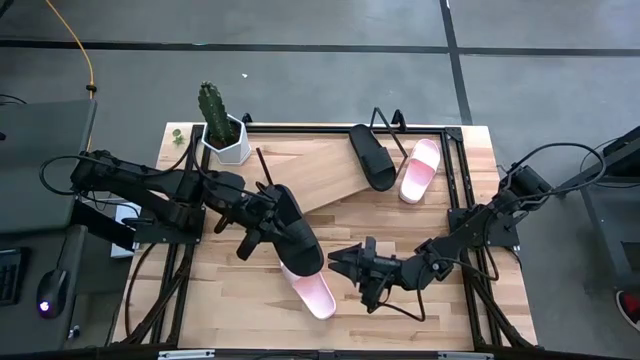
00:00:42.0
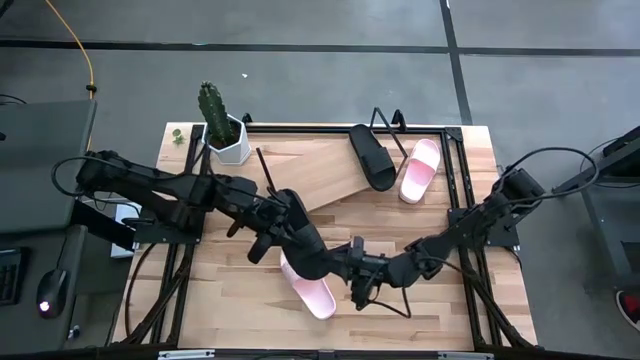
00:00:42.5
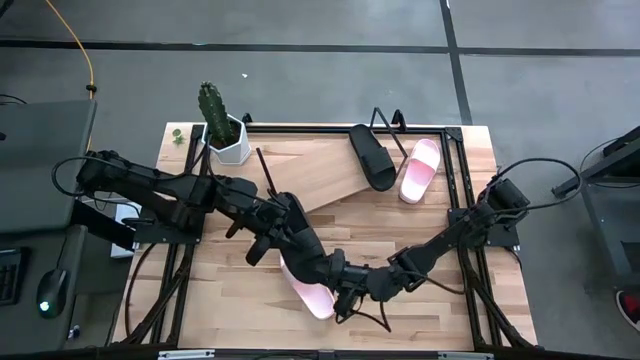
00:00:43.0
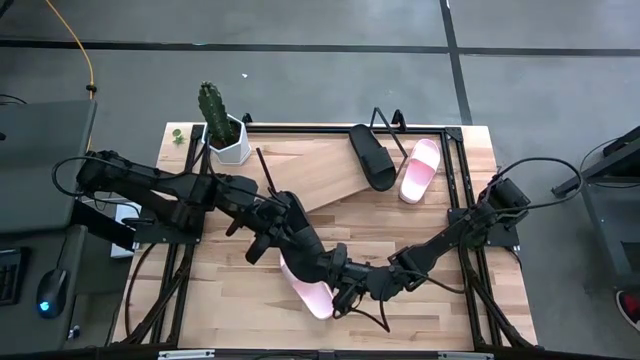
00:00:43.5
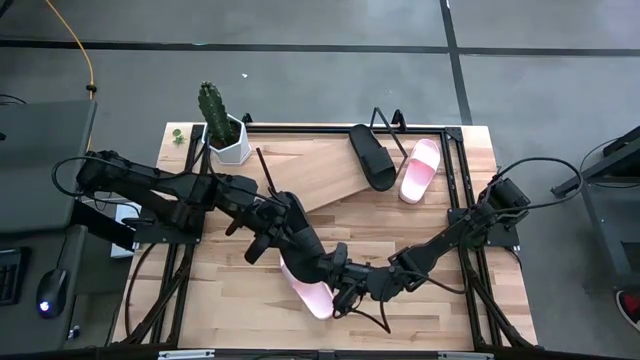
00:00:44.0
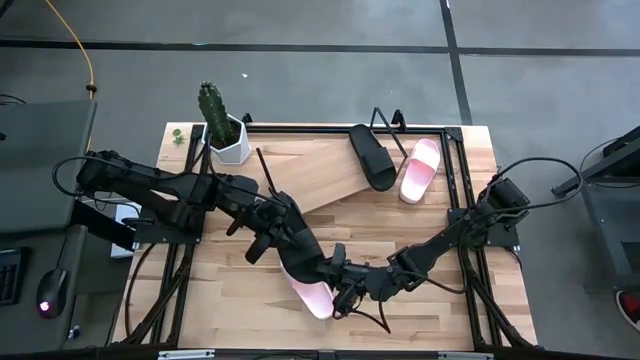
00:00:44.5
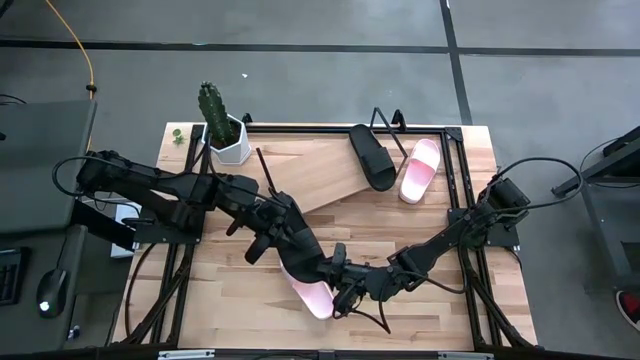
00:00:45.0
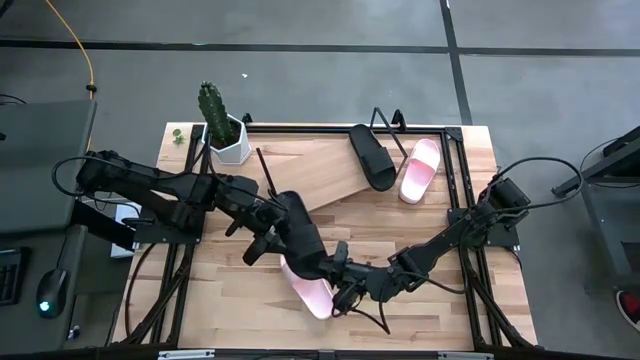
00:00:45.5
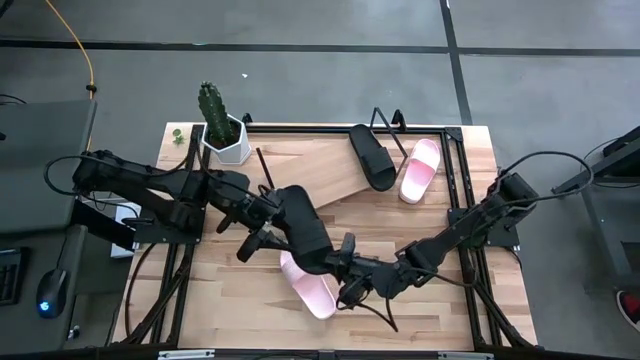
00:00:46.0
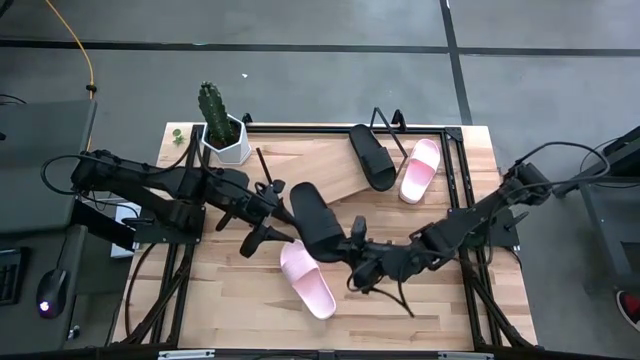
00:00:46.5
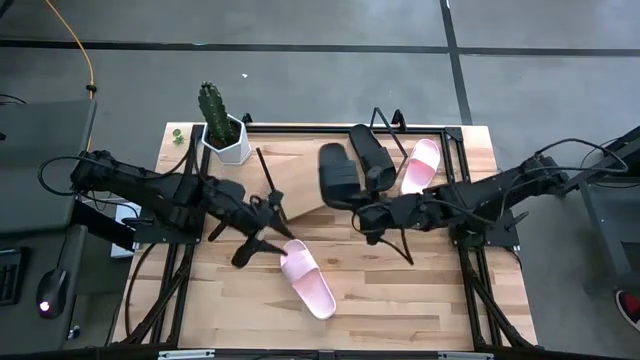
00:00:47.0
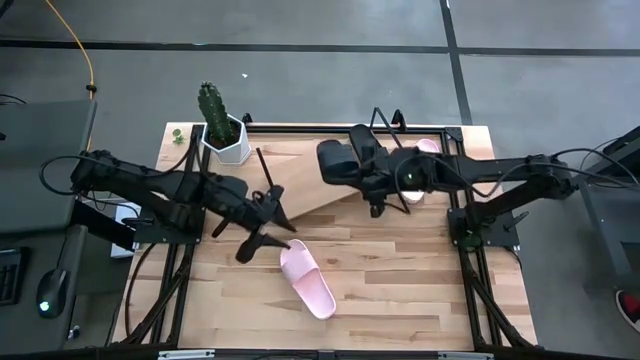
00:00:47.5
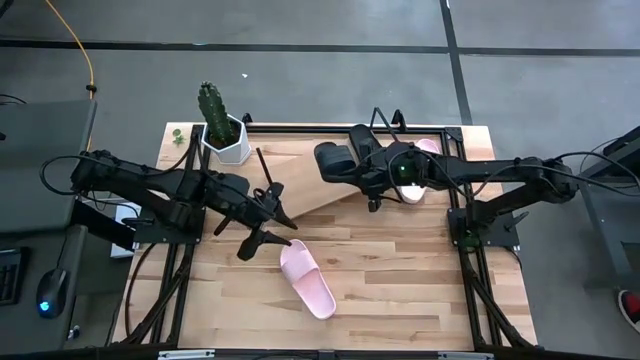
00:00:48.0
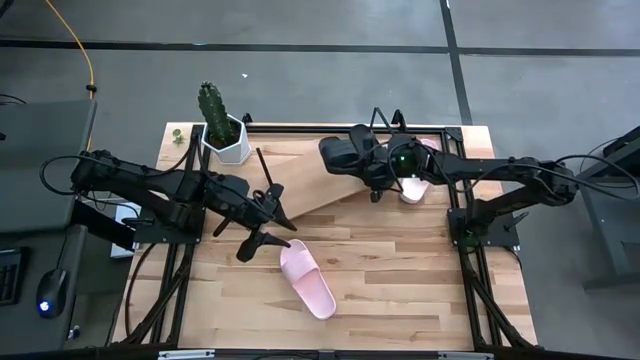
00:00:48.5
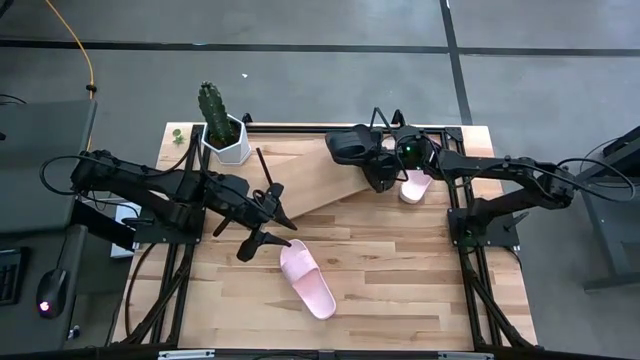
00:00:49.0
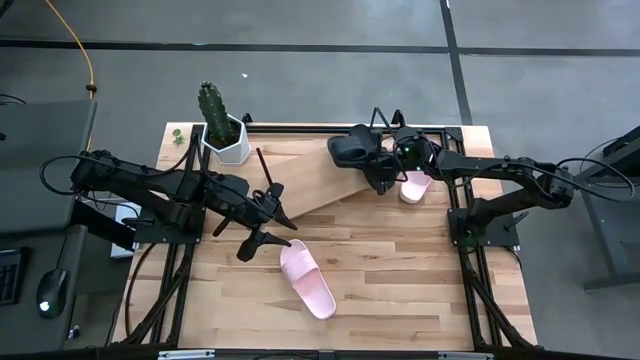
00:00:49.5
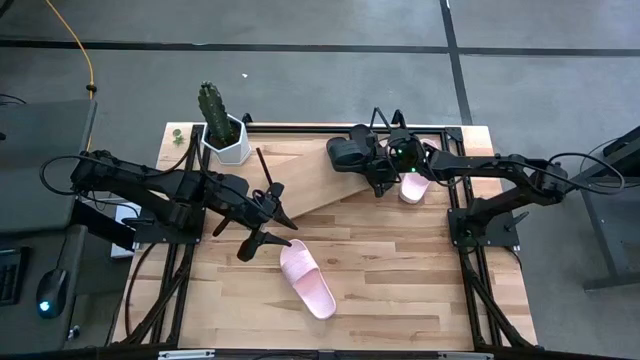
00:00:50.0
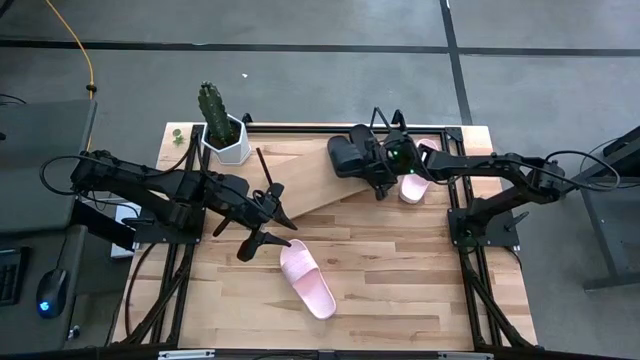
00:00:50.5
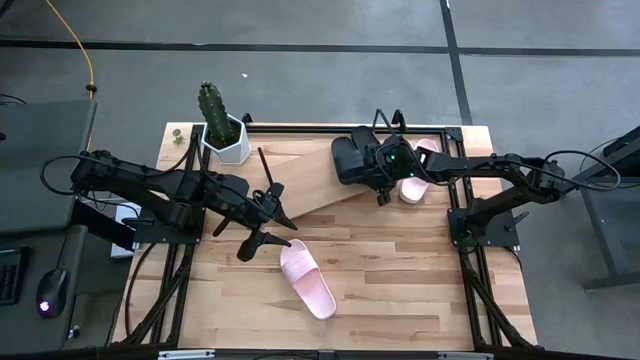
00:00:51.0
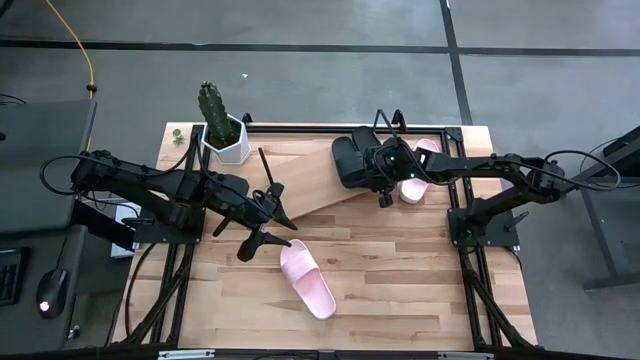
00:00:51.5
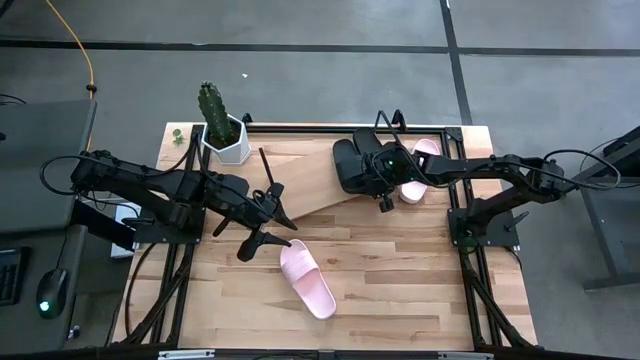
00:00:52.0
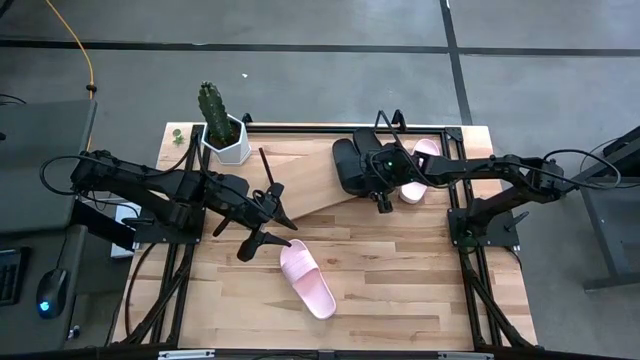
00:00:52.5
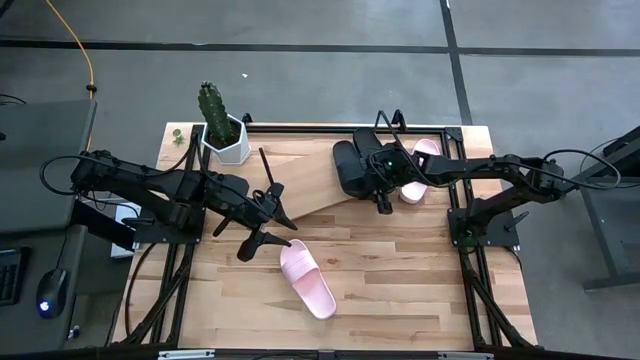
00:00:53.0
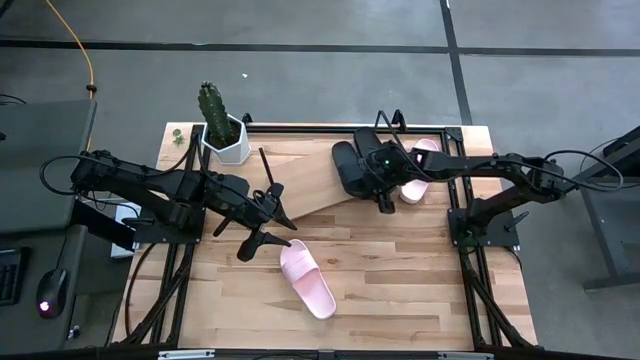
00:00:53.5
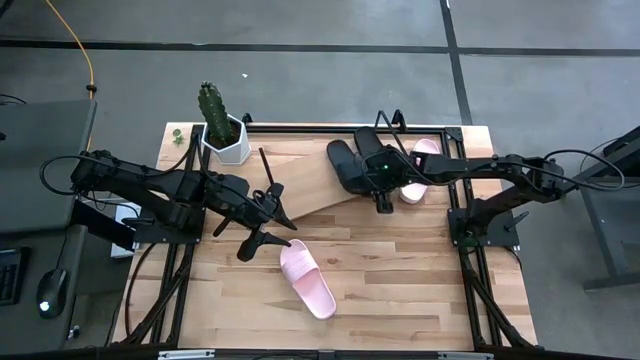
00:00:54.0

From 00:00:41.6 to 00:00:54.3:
Task: Pick and place slides into the shelf
Put the left black slide on the shelf

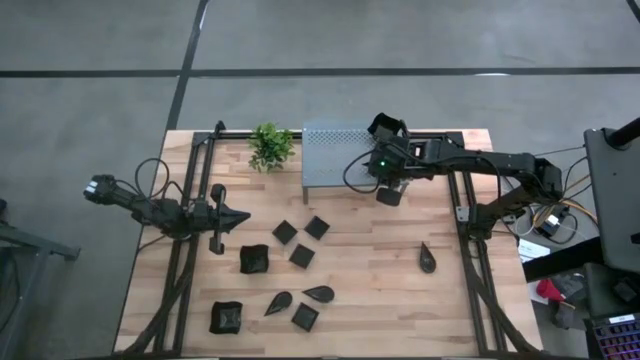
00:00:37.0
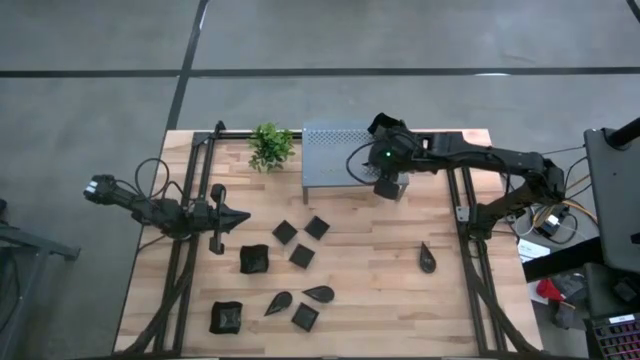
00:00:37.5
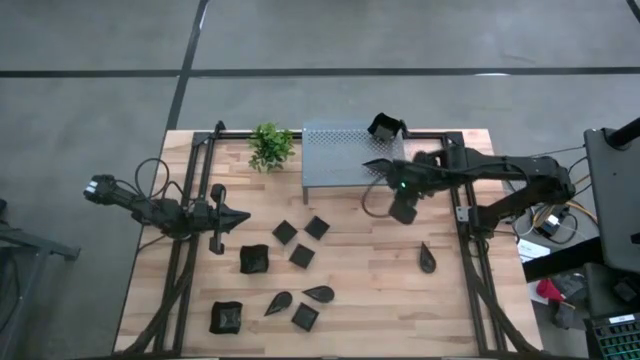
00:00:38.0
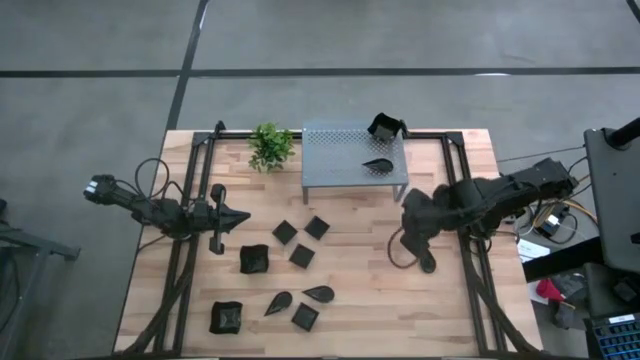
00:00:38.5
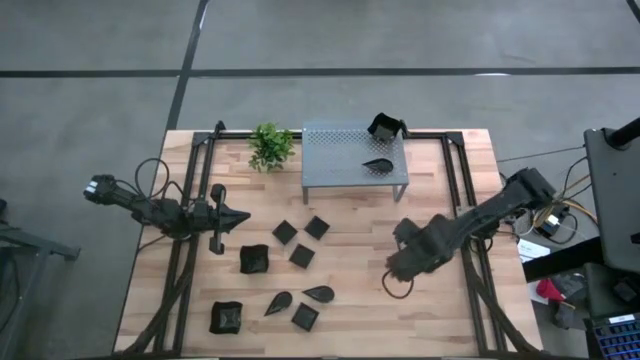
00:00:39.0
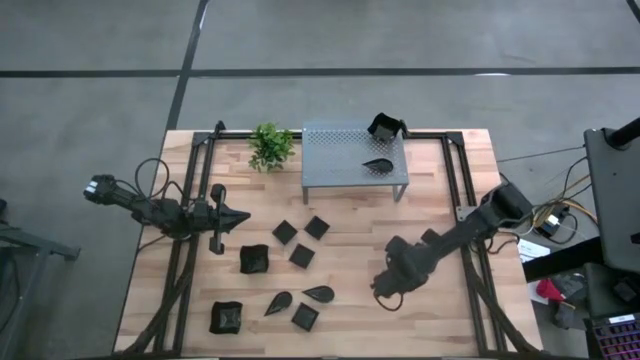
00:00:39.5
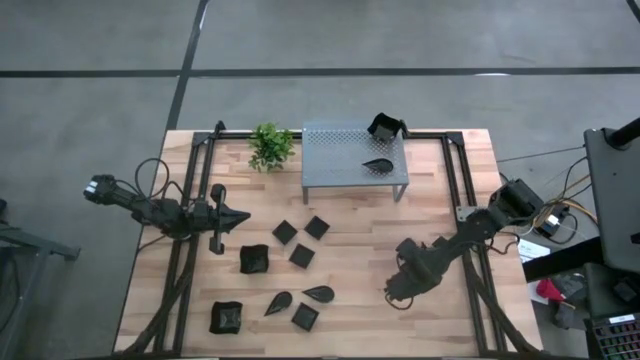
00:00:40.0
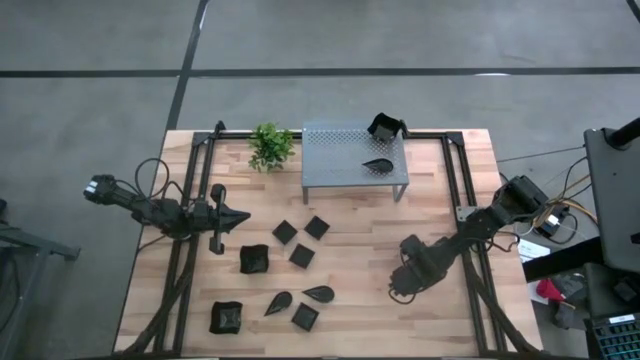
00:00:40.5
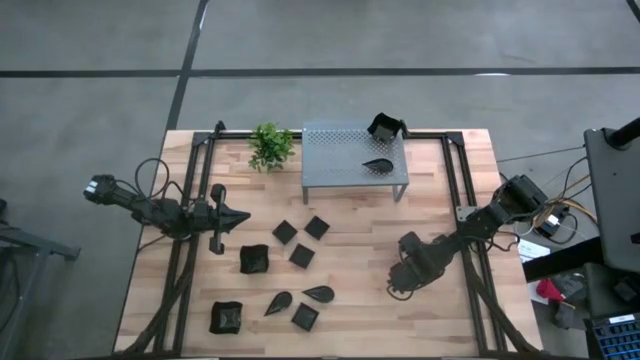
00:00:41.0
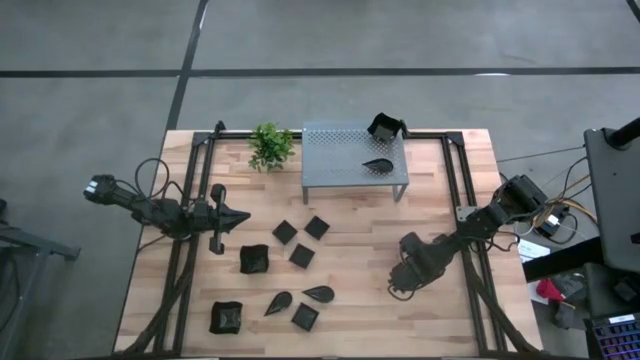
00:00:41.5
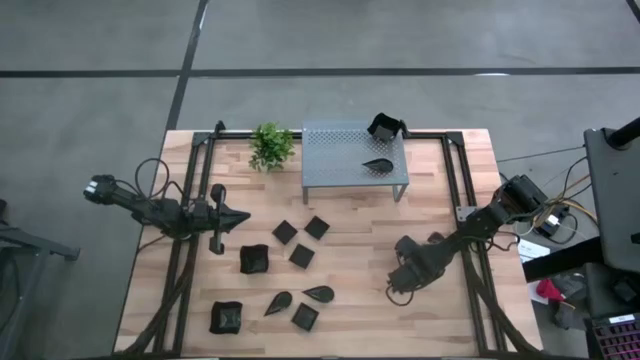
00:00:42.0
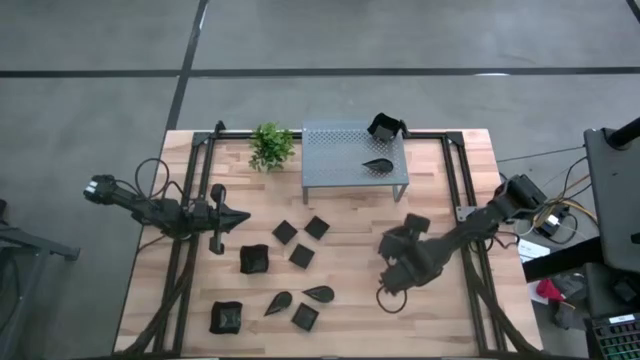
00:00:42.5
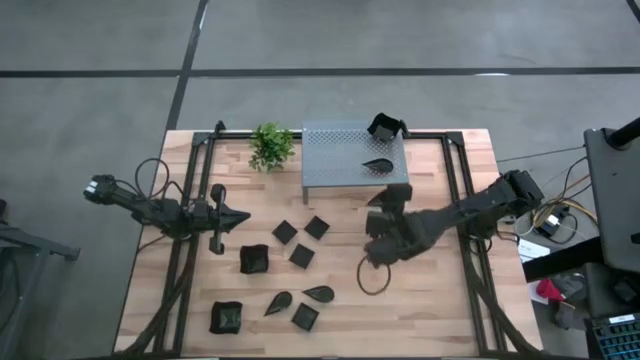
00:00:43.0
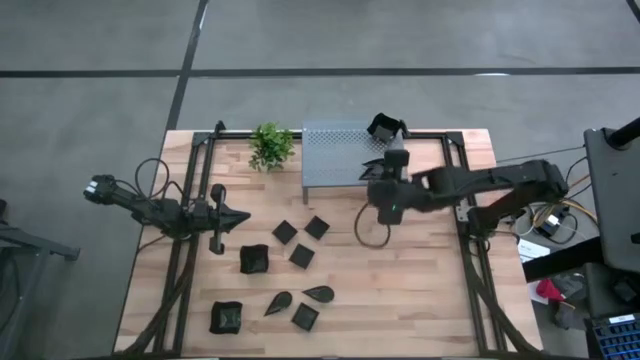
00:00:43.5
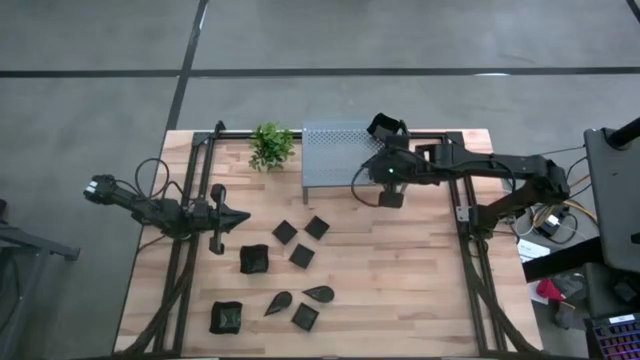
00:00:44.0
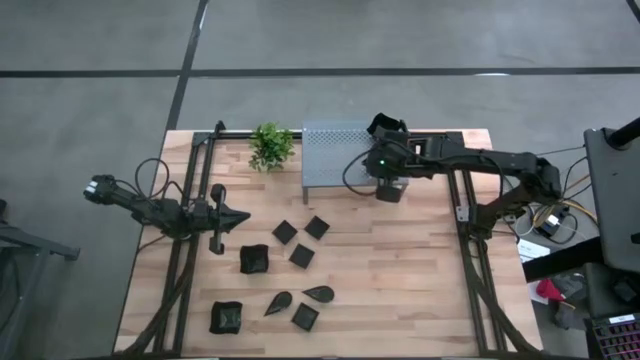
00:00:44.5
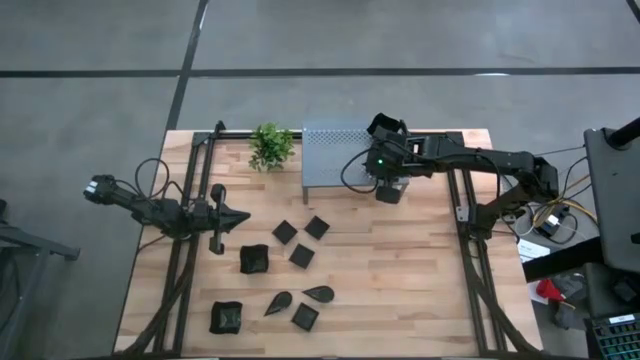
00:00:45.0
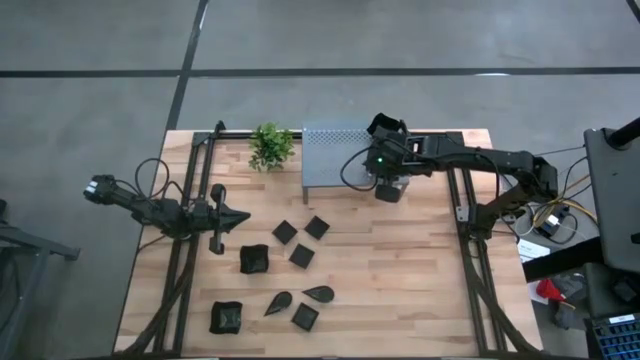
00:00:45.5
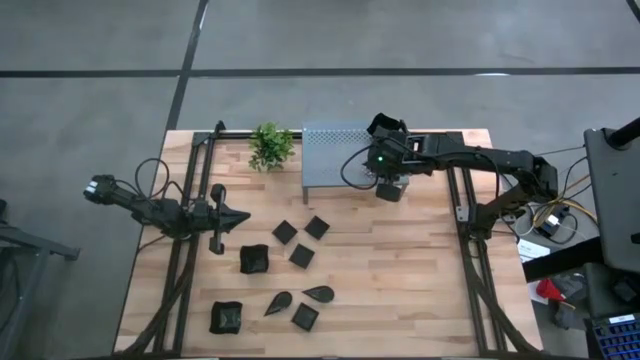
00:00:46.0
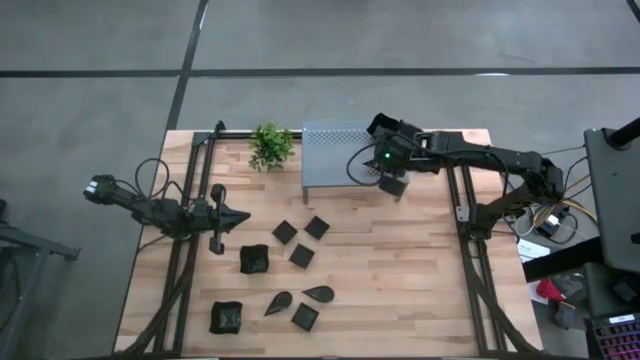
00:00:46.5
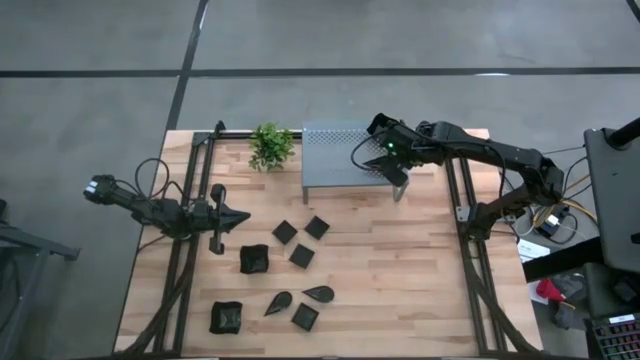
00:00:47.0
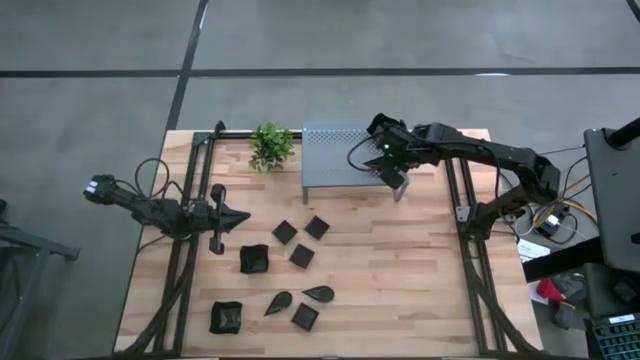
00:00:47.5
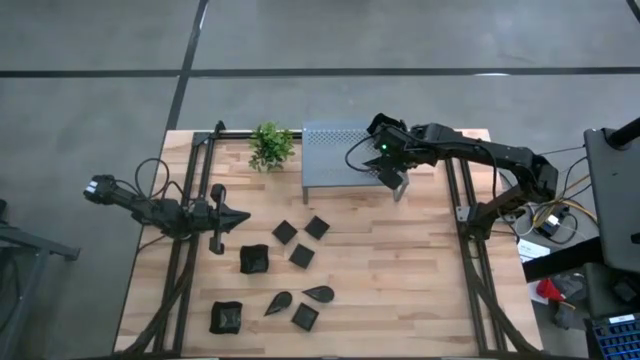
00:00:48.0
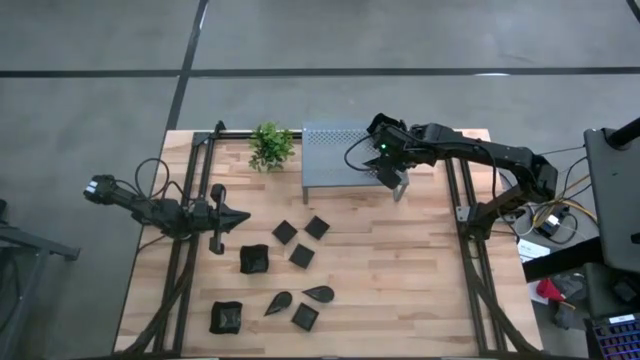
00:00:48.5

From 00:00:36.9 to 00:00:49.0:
Task: Pick & Place Mini shaped plates
Stack the drop shaped plate on top of the other drop shaped plate on the shelf
